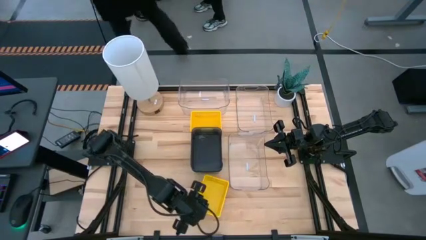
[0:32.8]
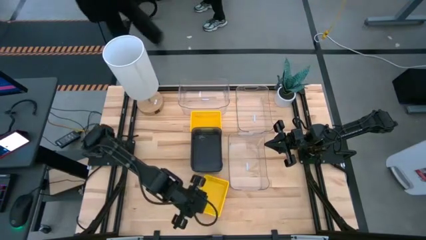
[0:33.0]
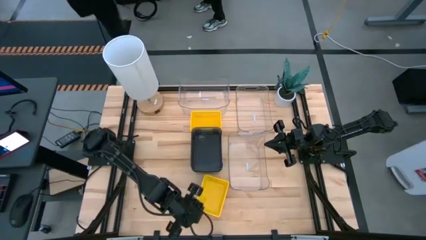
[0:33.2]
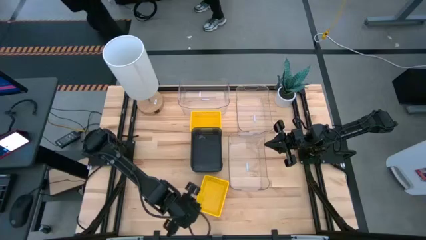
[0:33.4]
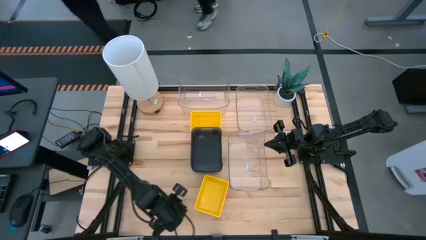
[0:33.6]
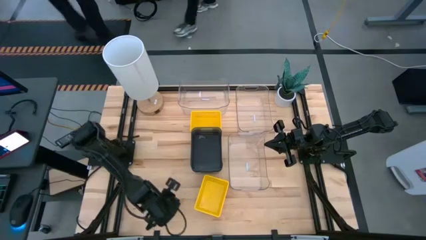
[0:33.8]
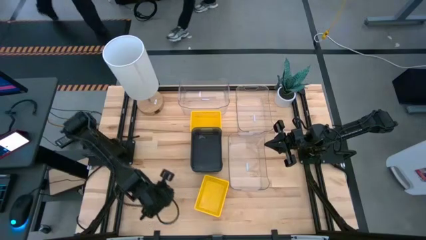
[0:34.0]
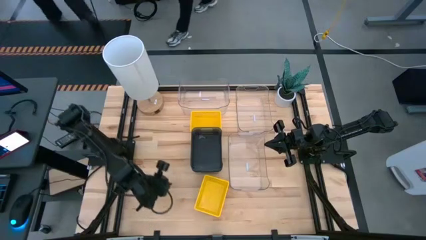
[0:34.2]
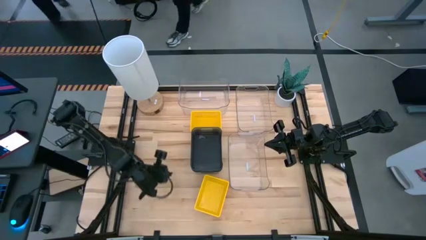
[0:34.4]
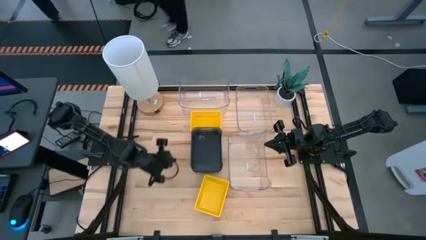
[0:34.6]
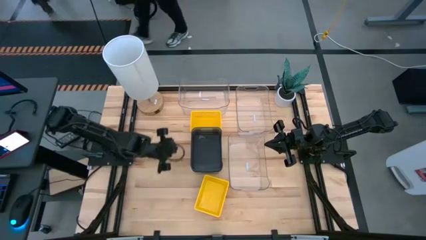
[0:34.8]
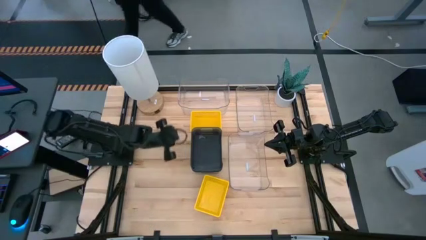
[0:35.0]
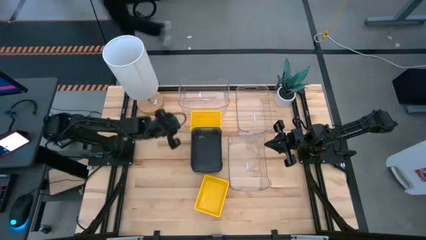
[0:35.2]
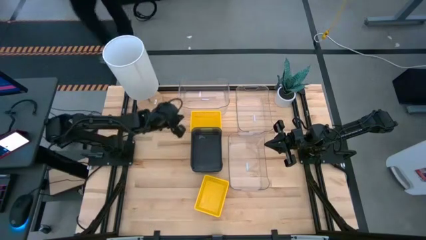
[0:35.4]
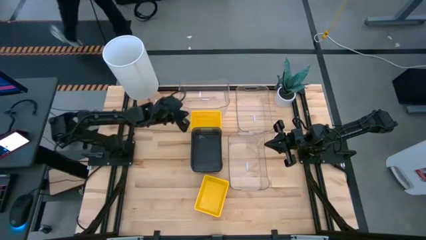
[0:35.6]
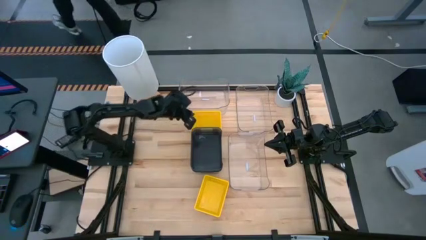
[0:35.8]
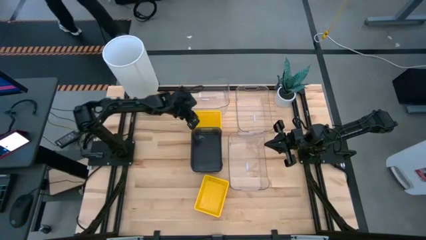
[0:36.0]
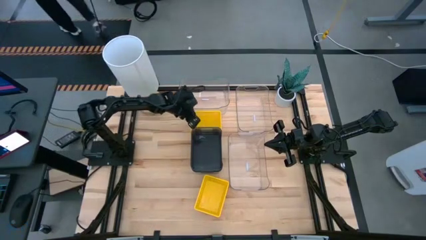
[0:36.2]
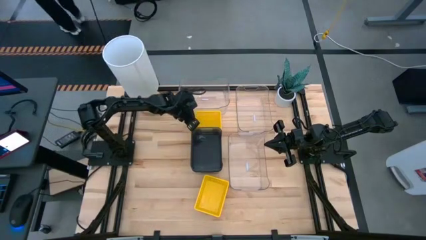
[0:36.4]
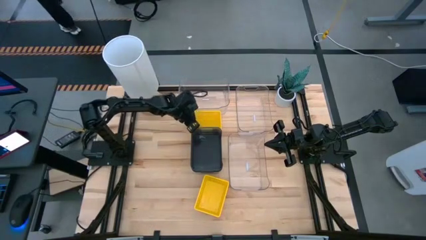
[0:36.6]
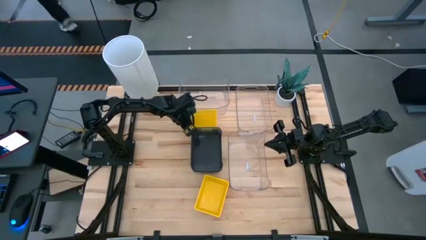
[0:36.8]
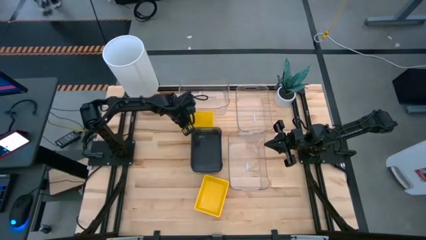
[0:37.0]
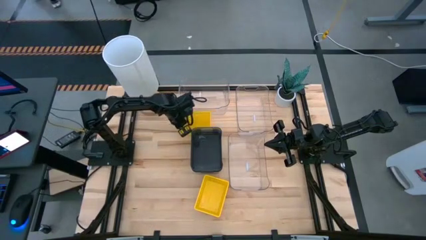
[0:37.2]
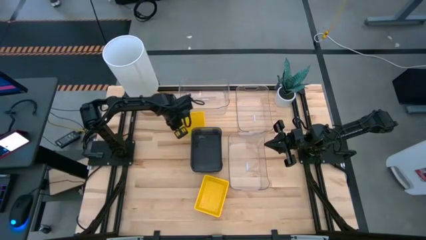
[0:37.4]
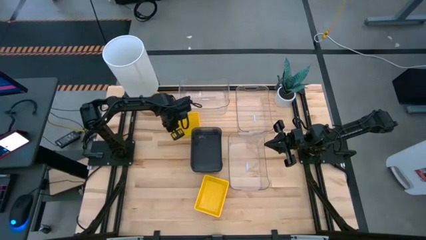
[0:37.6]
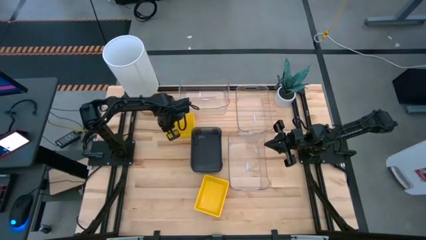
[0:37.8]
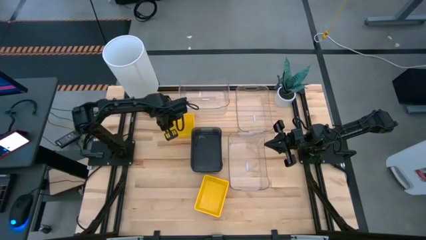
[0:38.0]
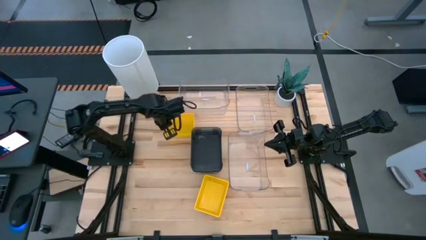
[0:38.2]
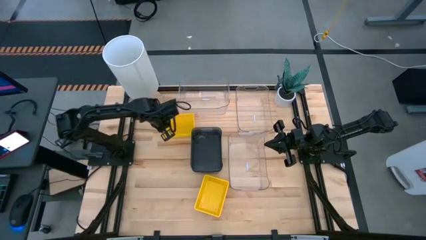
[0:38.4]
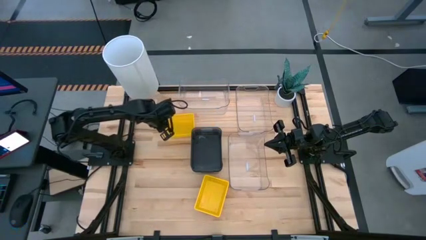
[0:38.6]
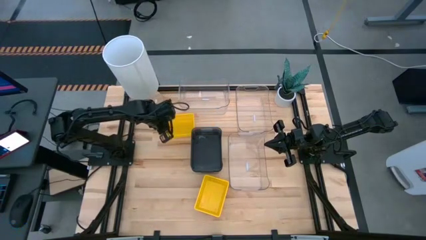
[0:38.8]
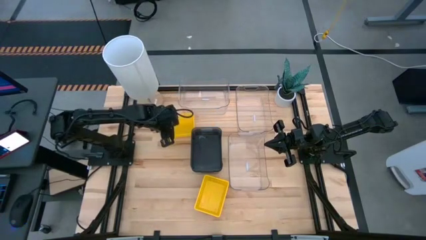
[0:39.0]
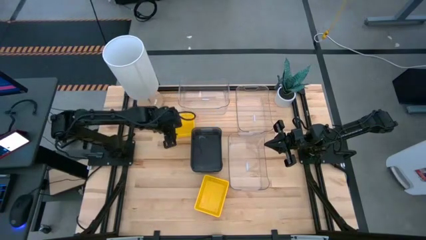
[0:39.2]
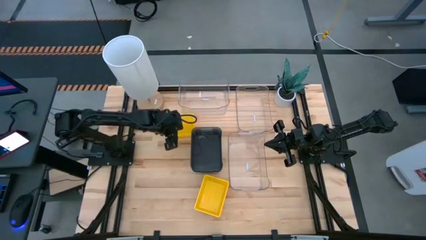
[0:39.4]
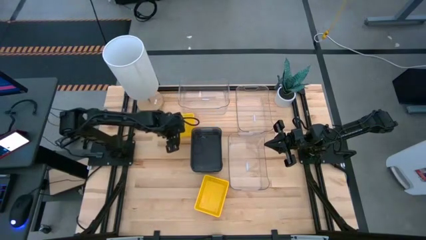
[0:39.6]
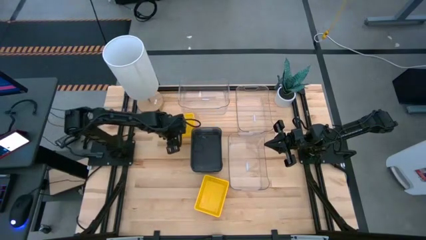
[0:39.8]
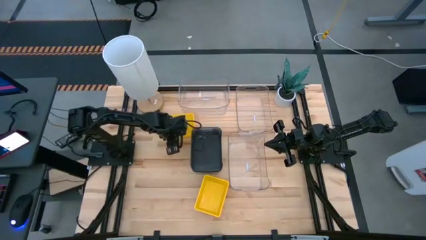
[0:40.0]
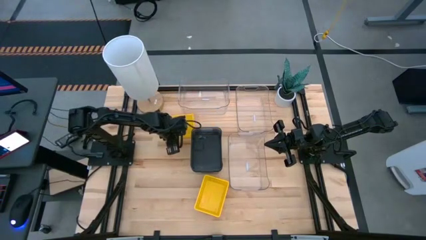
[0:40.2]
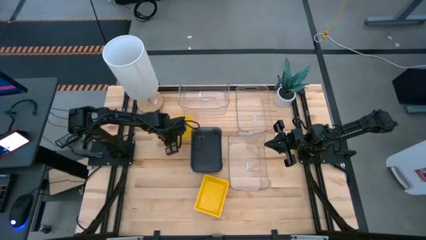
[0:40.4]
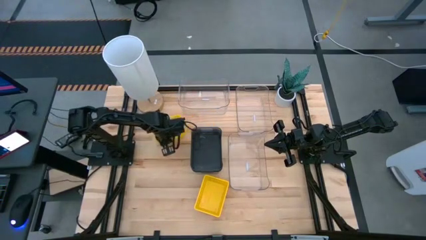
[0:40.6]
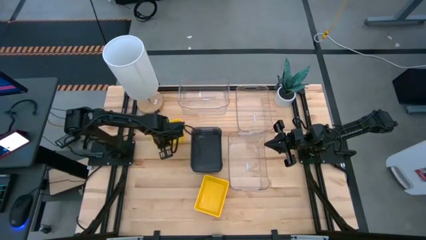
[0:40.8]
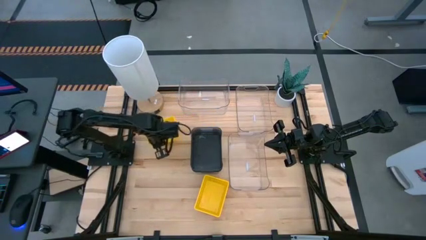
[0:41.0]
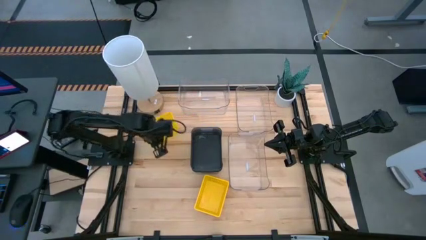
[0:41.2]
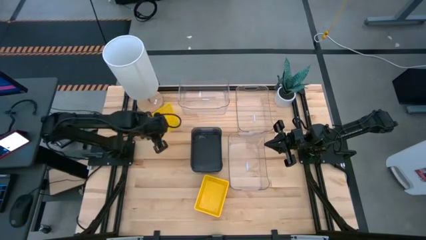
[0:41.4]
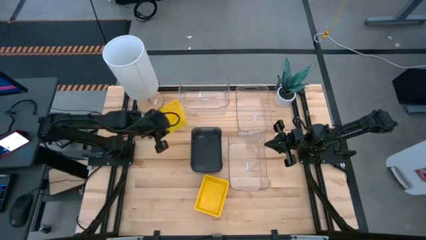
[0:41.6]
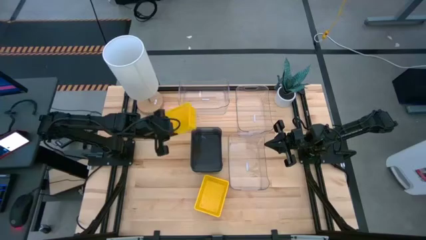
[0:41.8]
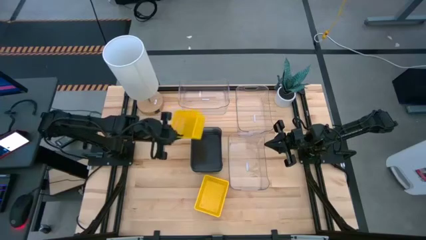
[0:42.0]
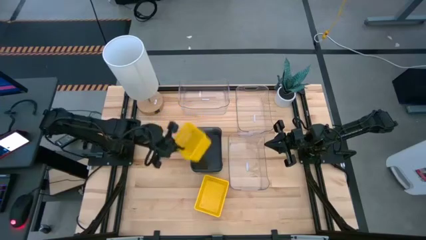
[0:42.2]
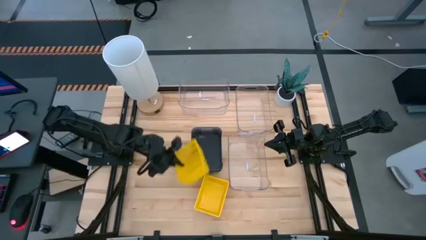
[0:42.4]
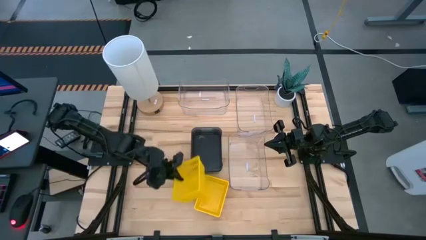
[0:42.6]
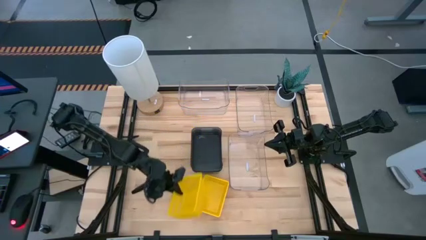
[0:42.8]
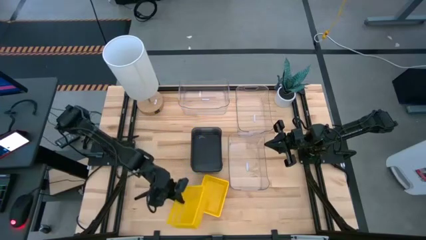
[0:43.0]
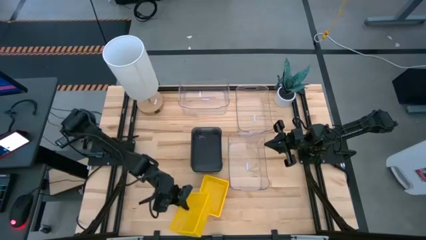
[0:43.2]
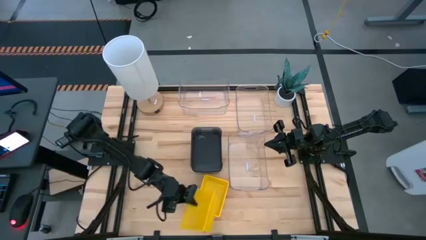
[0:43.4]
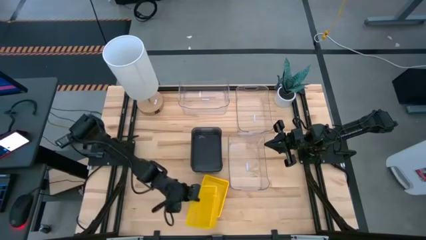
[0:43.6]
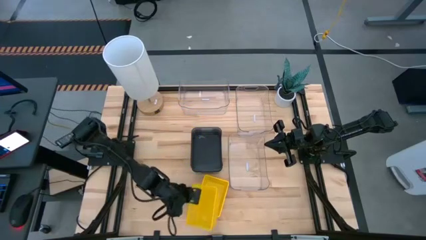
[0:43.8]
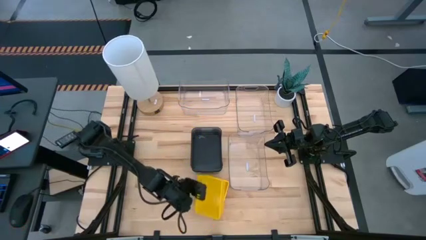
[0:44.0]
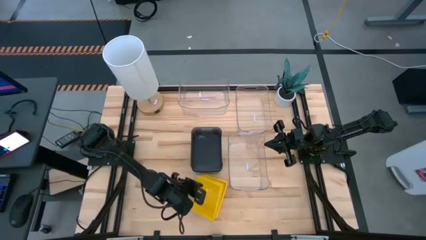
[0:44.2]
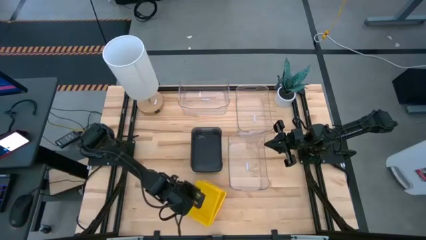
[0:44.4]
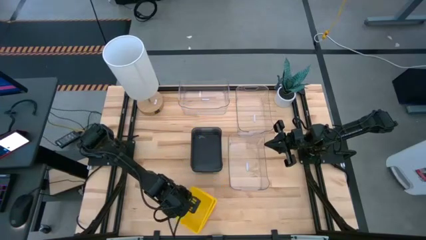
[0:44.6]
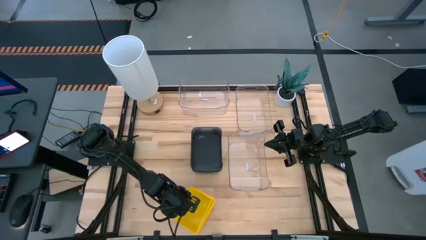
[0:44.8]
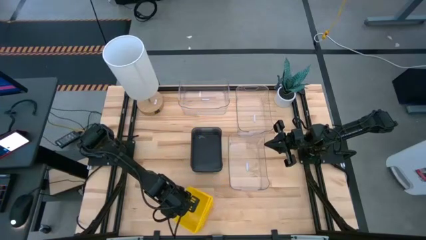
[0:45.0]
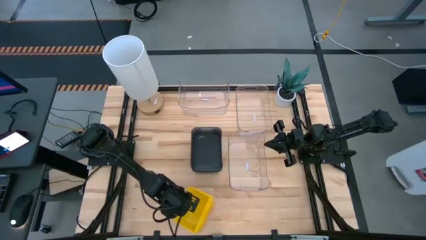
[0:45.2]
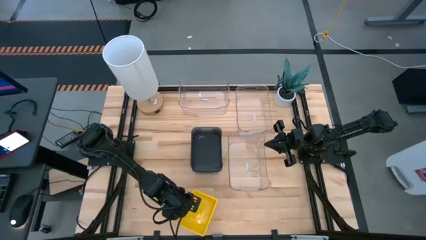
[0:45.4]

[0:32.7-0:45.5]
Stack the top yellow bin on top of the yellow bin
